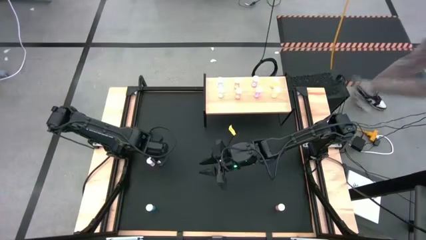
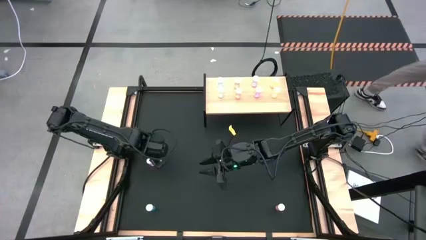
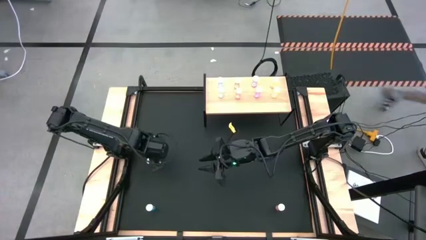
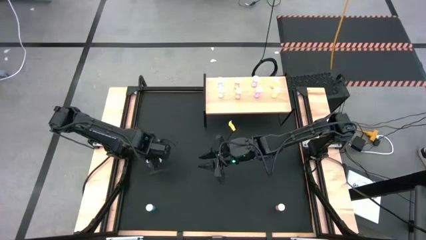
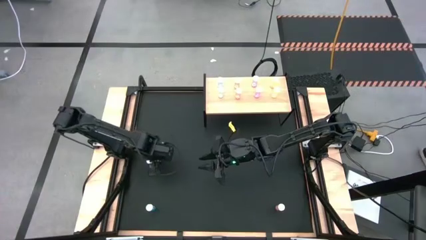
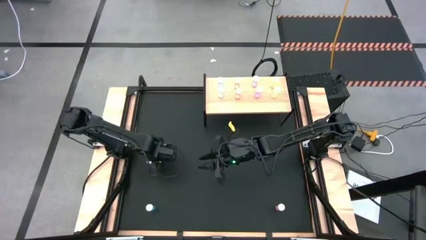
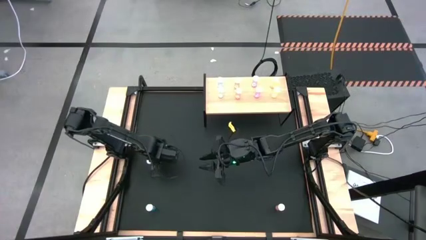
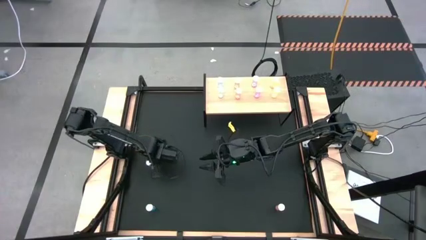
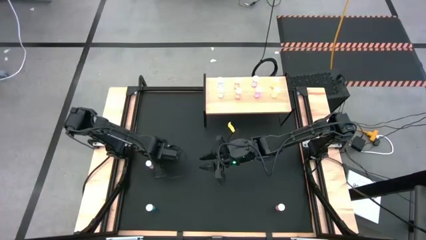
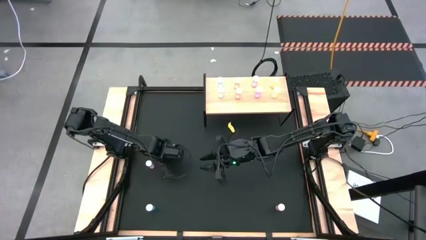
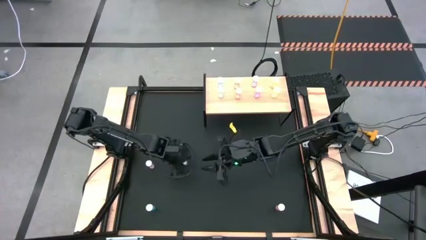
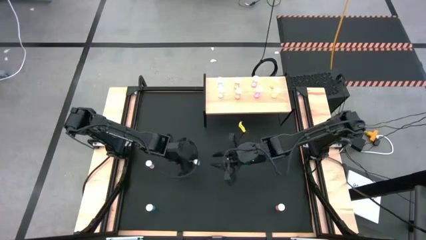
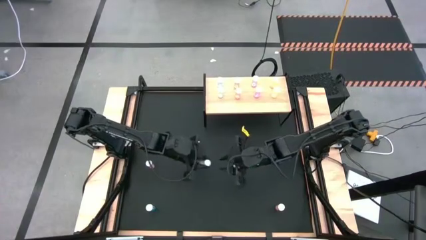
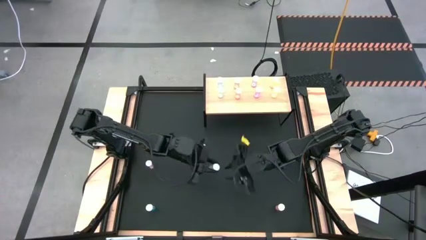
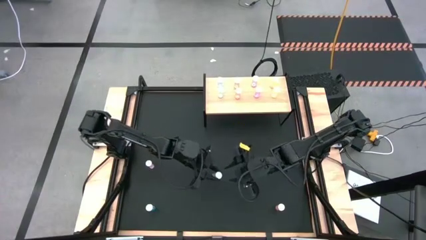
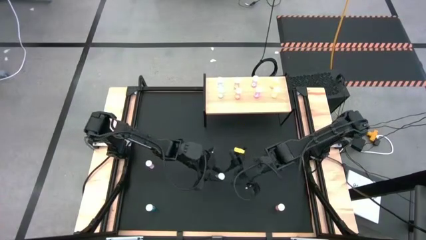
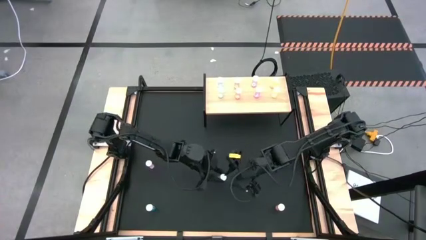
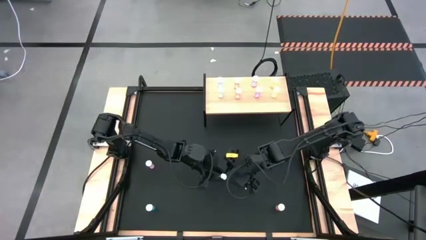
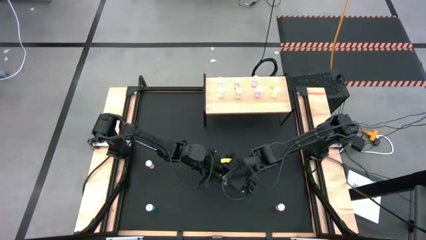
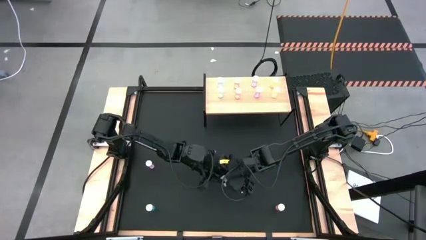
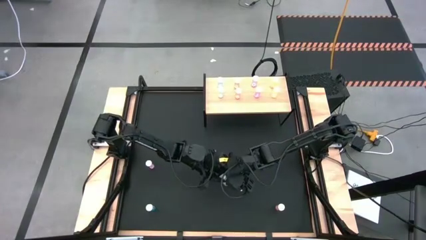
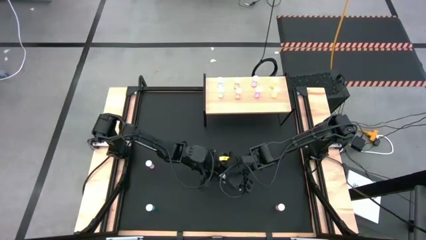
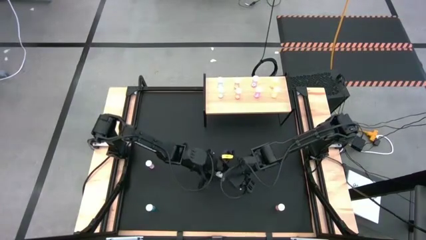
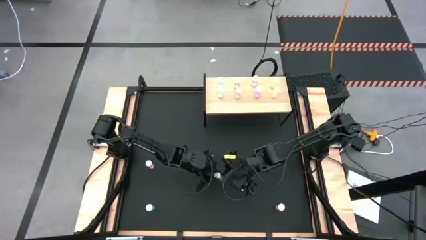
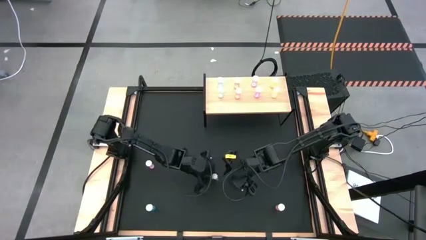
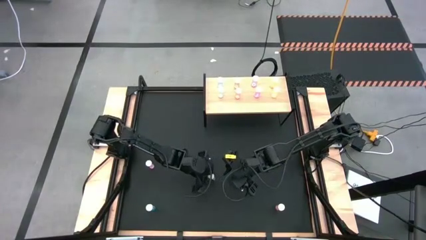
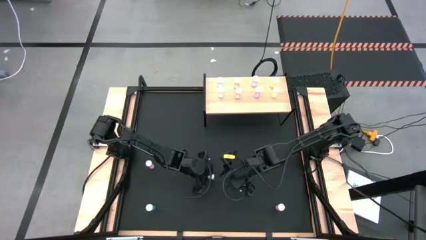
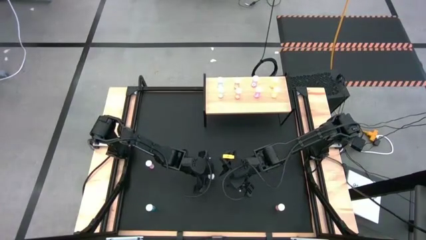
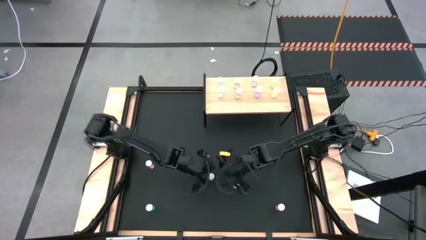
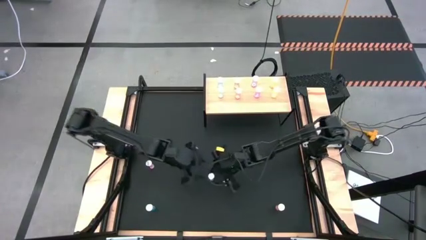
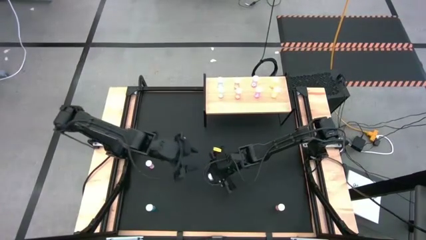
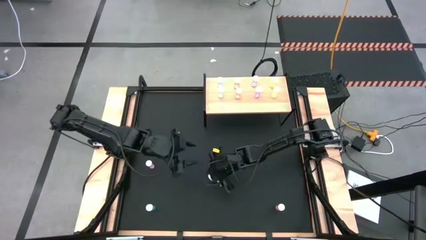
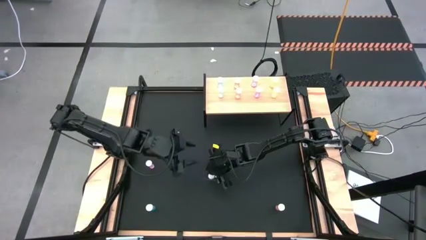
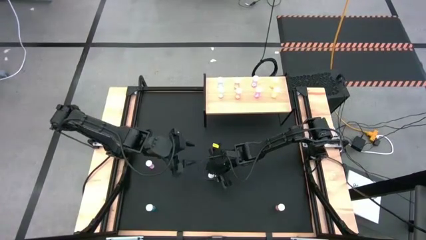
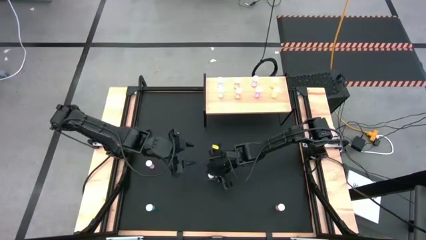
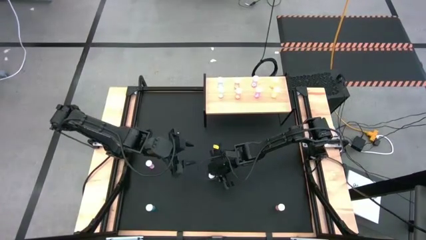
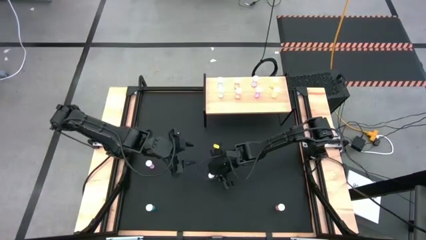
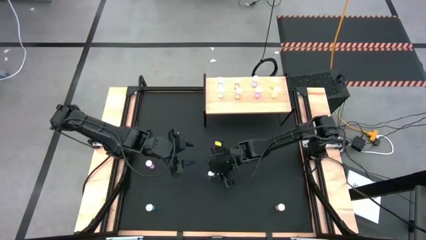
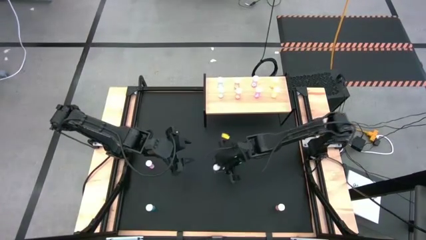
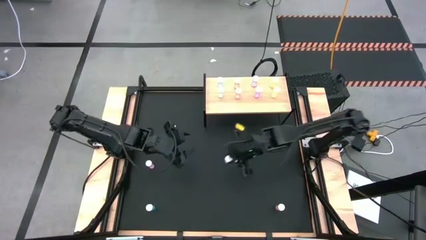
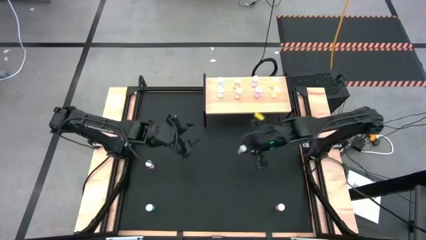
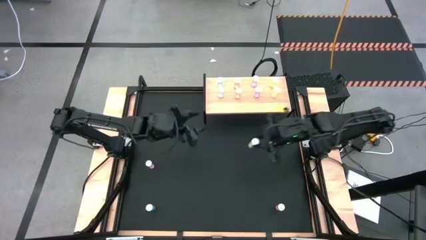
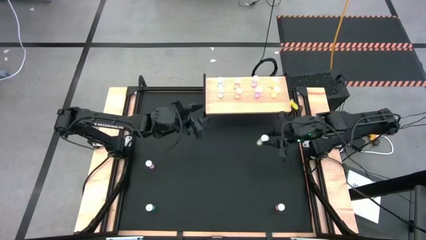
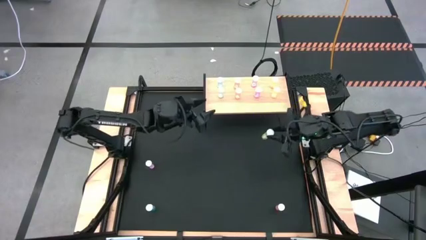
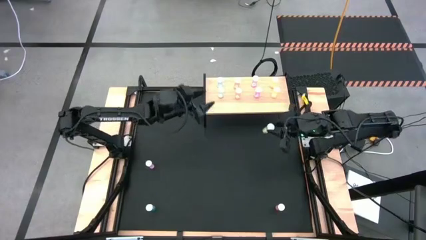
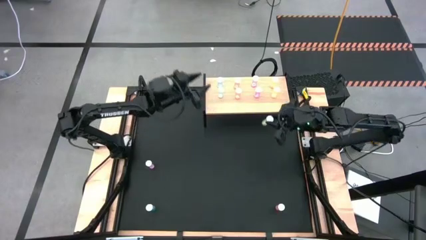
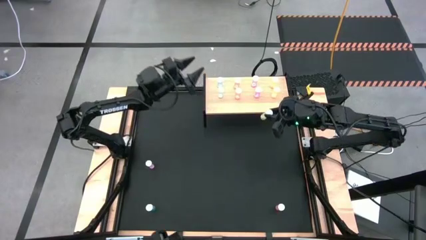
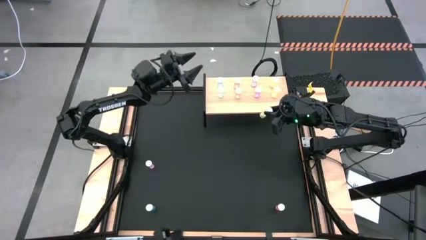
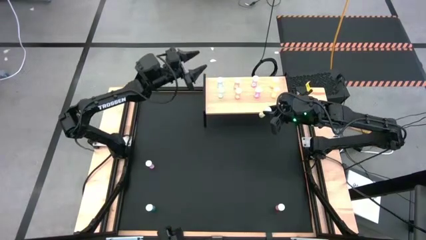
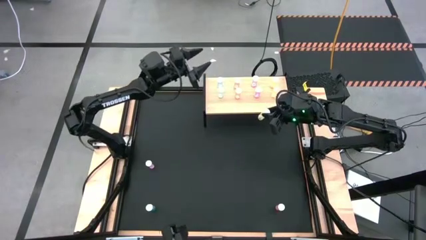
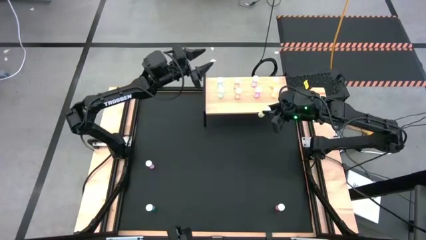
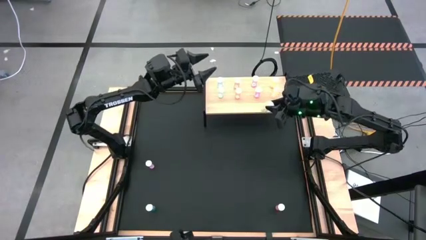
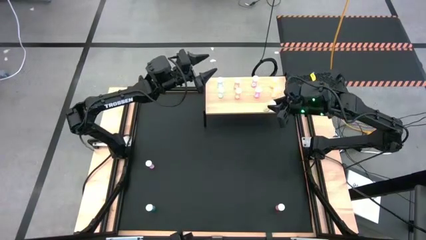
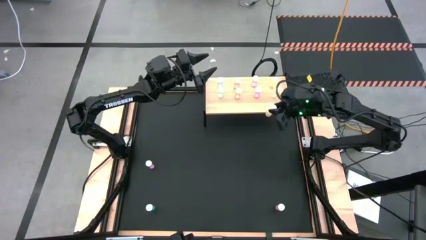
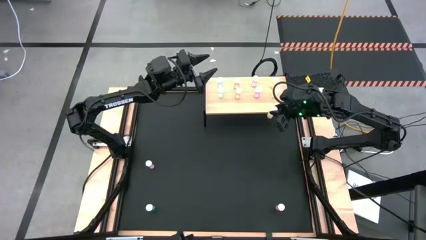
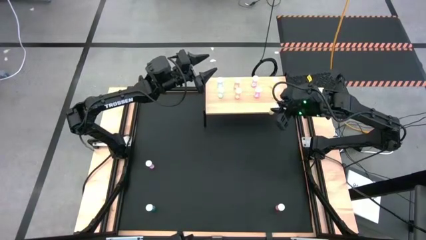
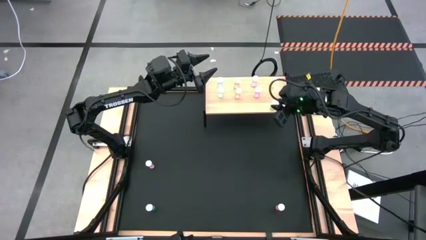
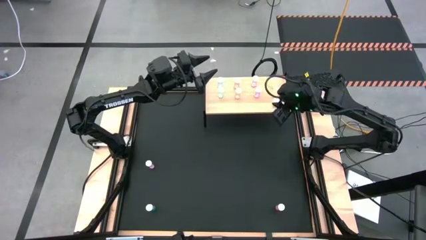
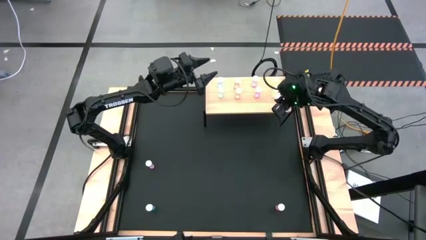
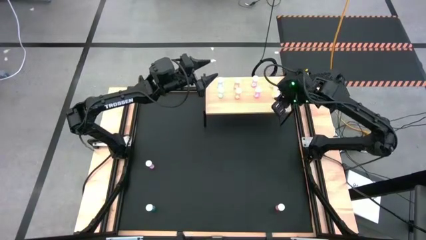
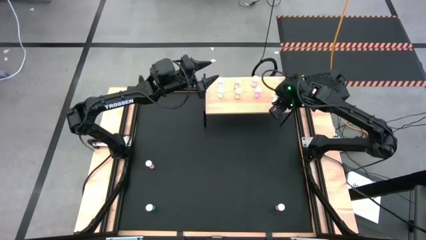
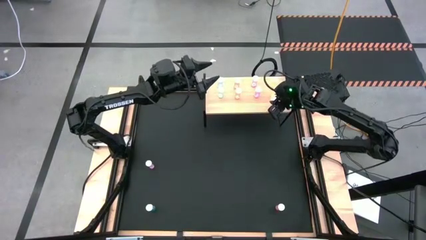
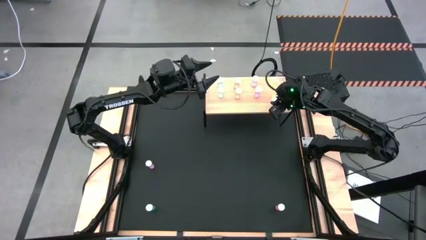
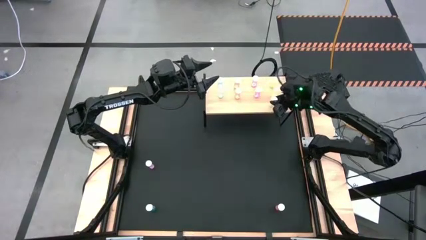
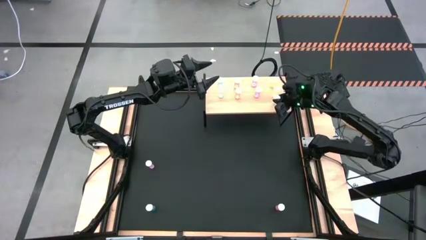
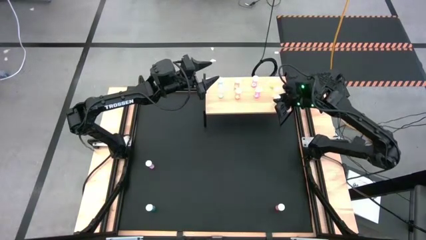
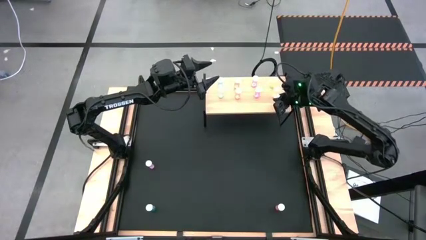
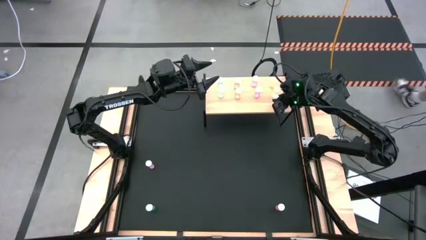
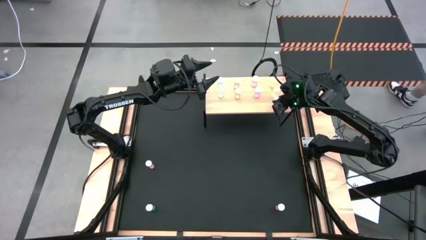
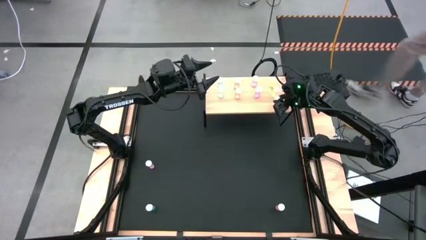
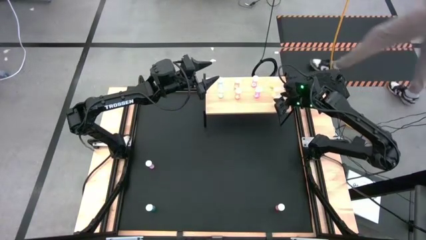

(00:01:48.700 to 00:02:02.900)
Task: Pick and place medicine bottles onto shelf by color
Put the yellow pill bottle on the shelf aligned with the other yellow pill bottles

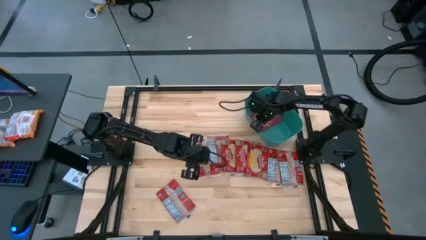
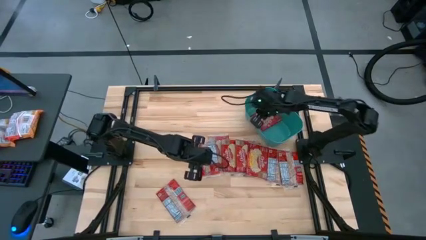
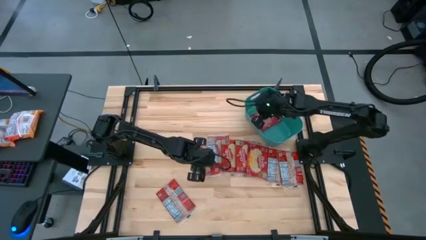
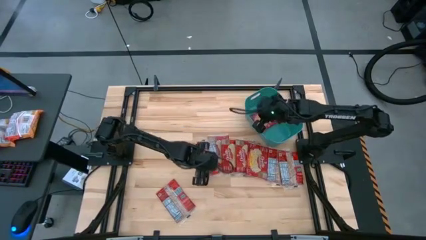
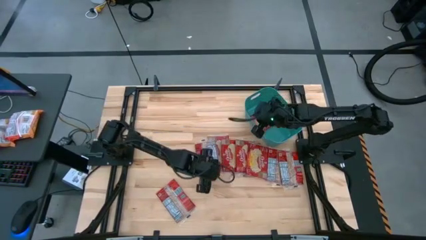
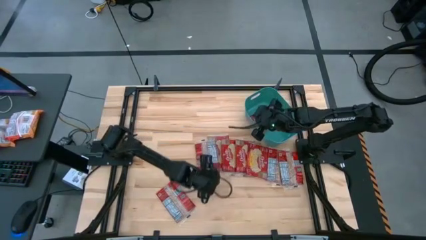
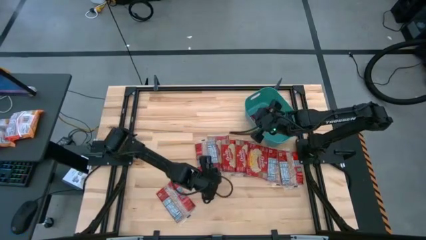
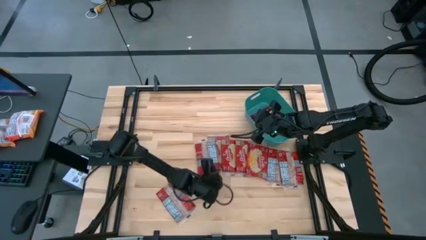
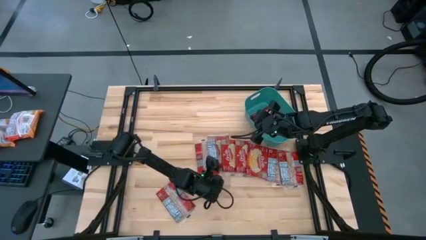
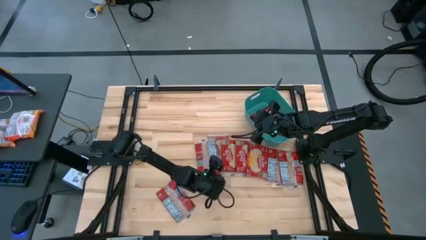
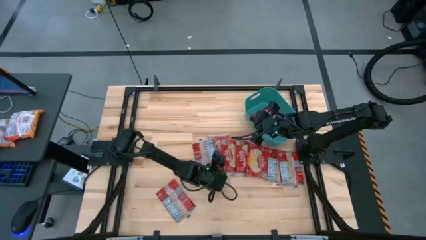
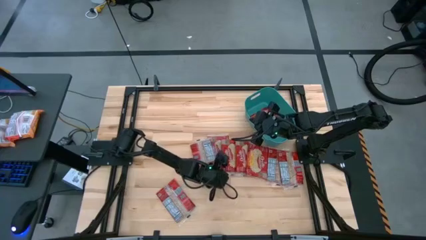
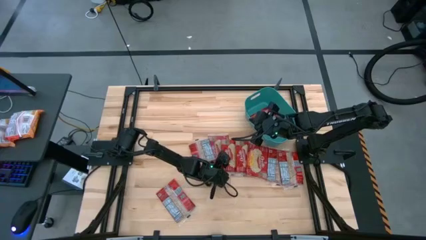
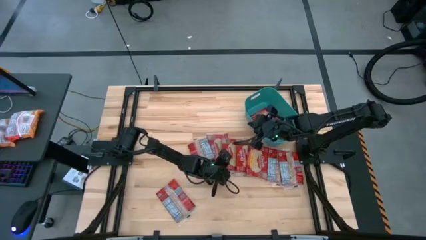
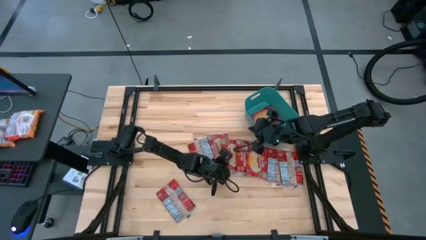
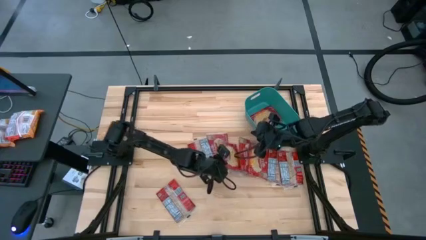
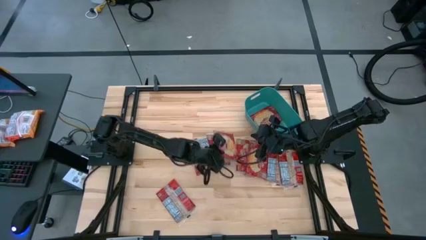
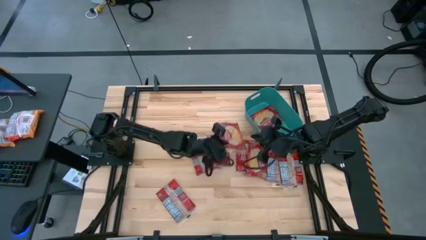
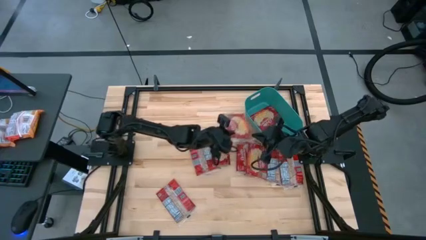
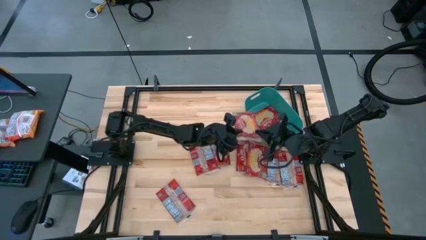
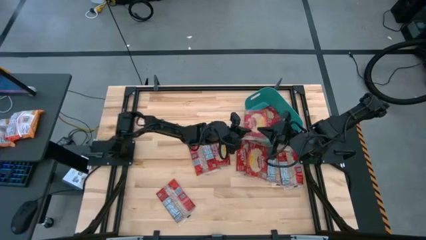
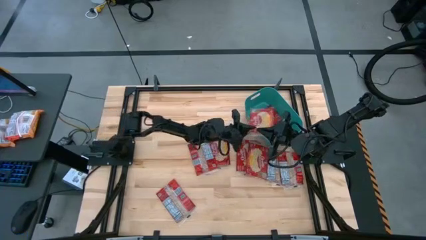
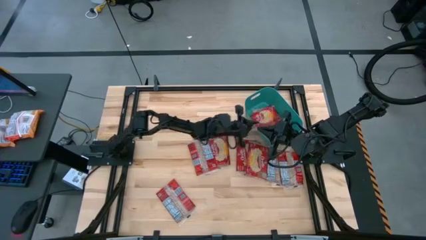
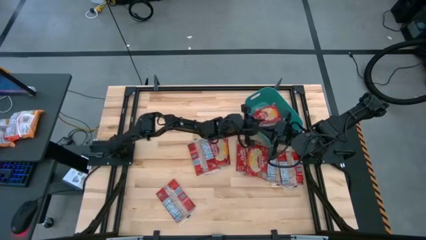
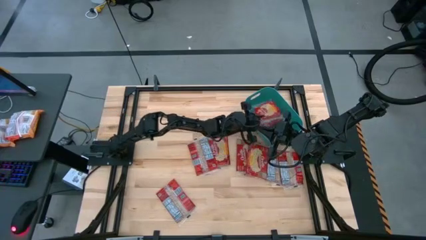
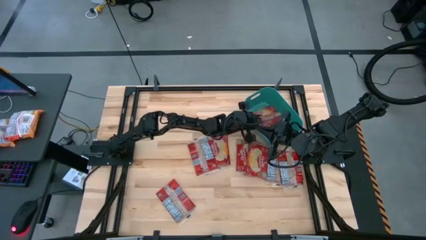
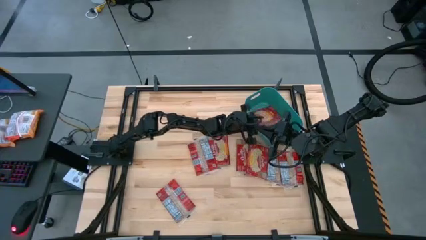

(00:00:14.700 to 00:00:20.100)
Task: Sort popcorn bags into baskets
Put the red popcorn bag into the green bin
